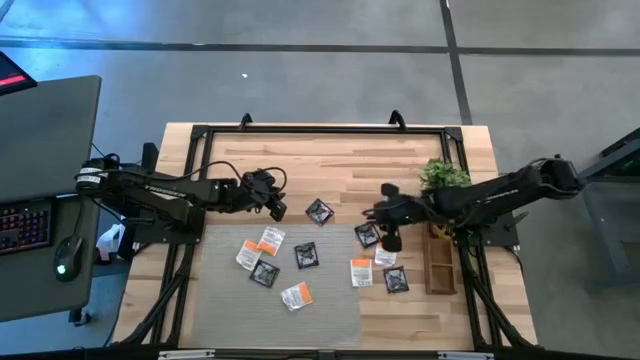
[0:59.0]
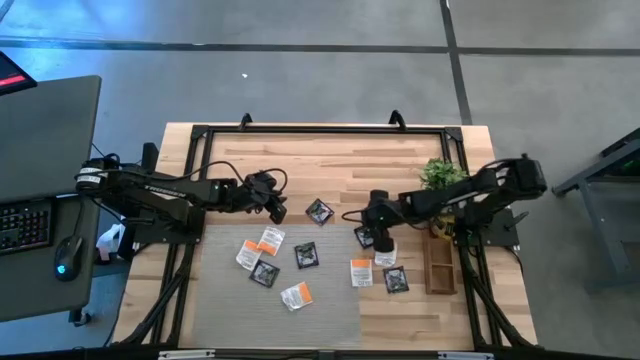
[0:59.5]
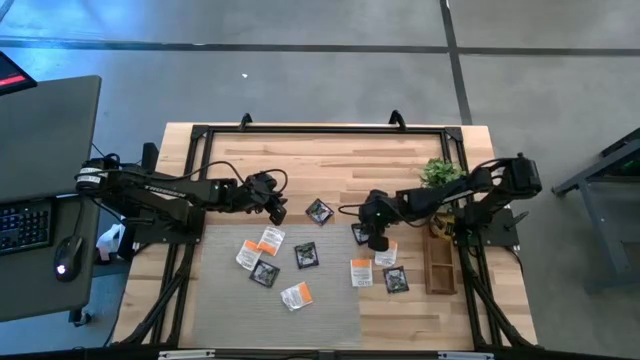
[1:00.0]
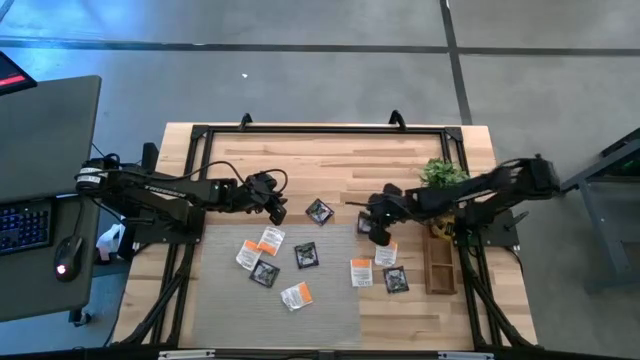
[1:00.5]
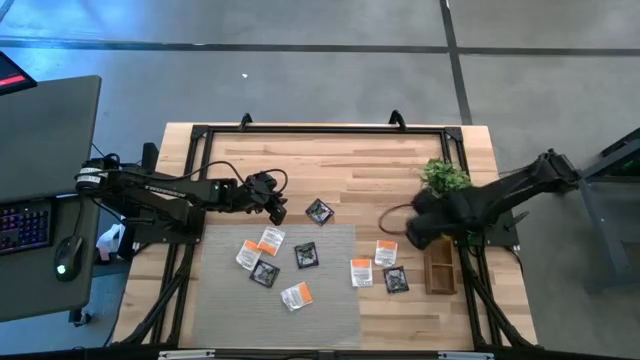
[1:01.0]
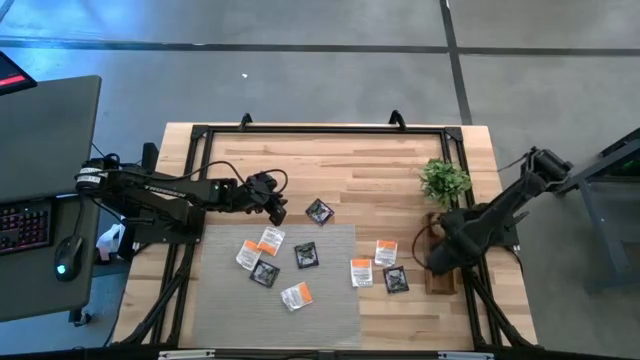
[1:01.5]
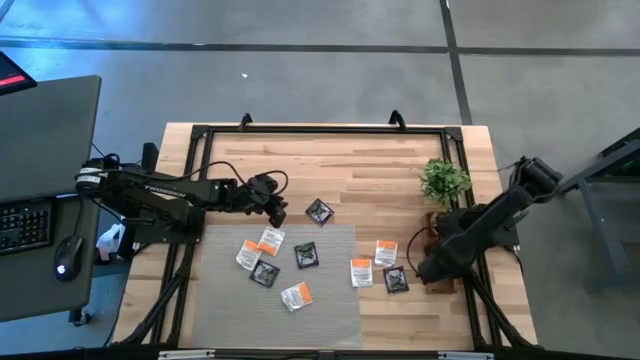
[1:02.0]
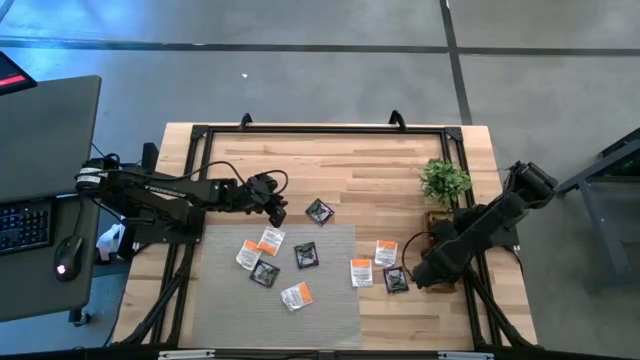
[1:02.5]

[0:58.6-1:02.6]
Task: Pick & Place Tea
Put the black tea bag into the middle section of the wooden organizer

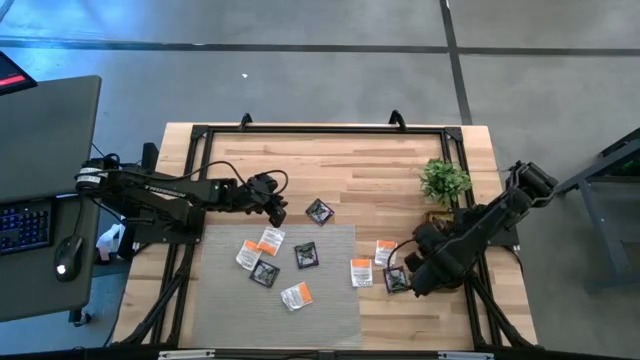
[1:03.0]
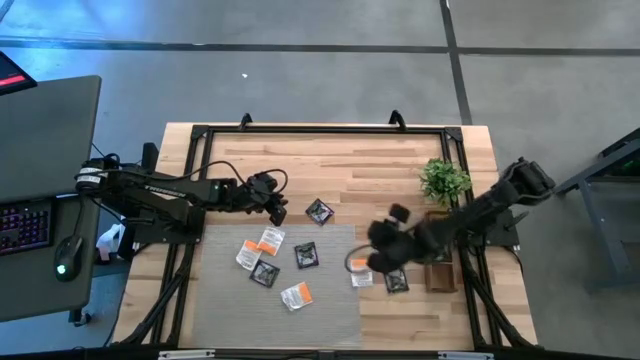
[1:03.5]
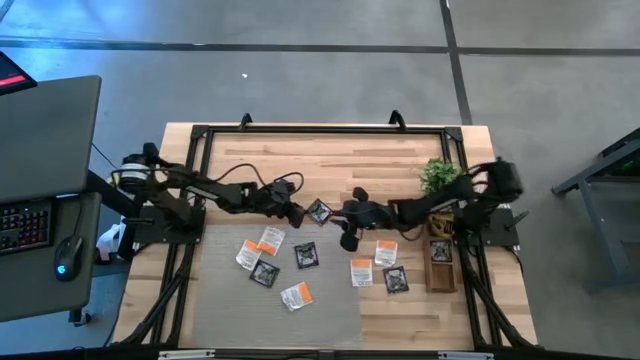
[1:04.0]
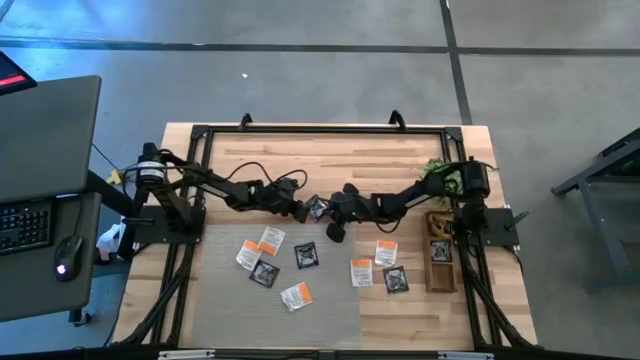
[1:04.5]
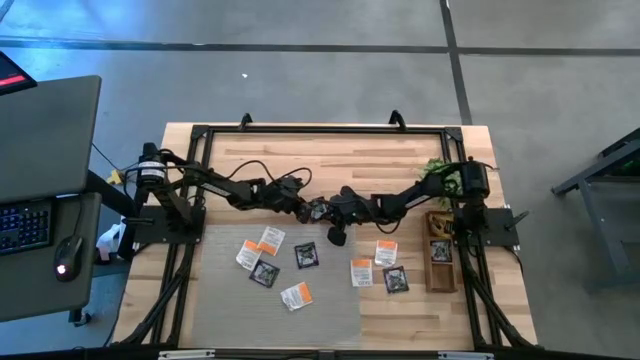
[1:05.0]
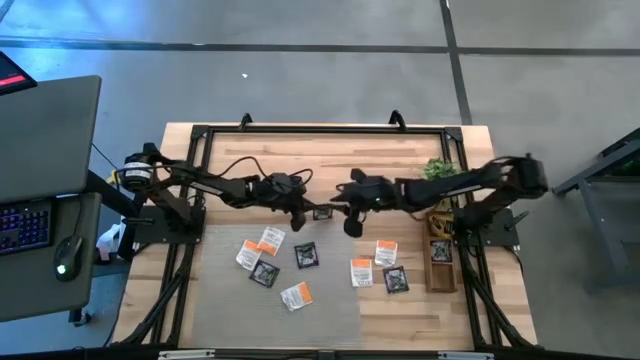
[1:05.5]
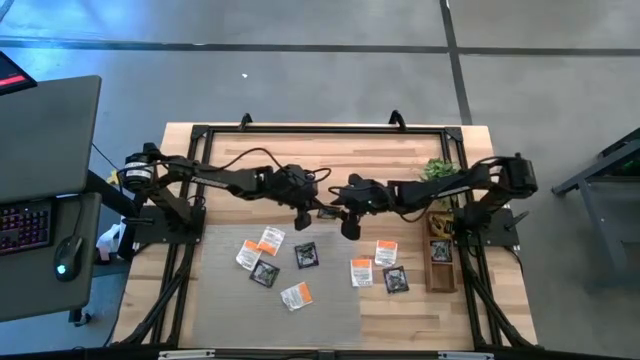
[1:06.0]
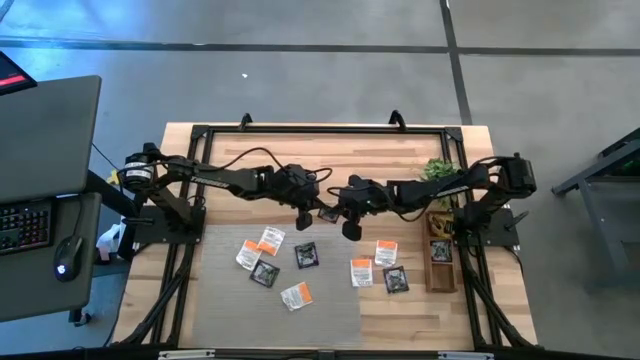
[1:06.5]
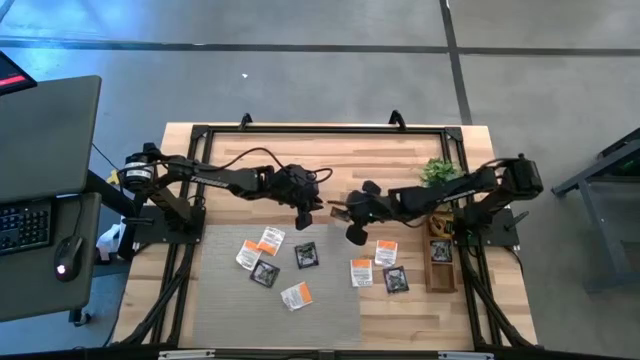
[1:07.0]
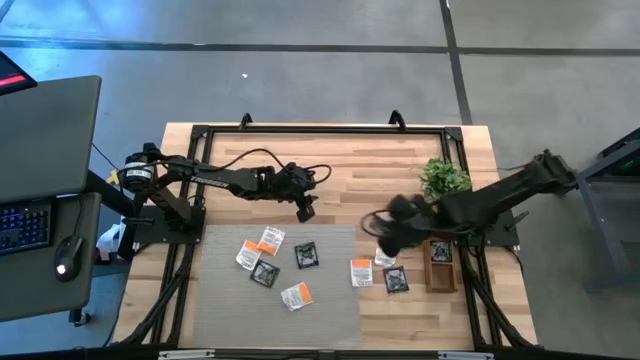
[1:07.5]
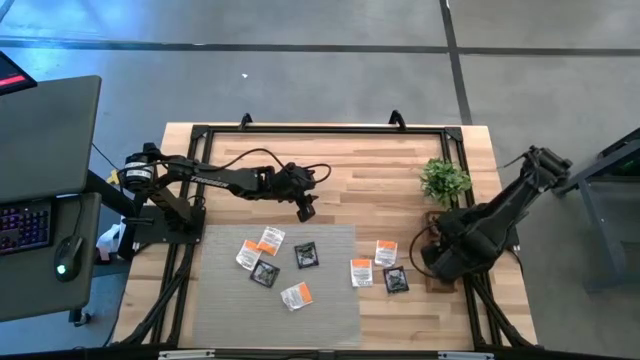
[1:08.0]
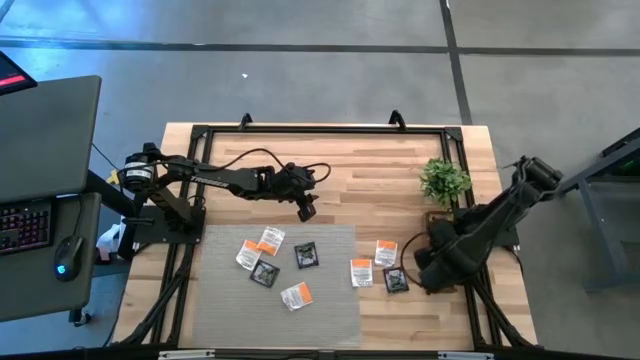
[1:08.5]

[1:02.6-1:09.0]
Put the black tea bag into the middle section of the wooden organizer

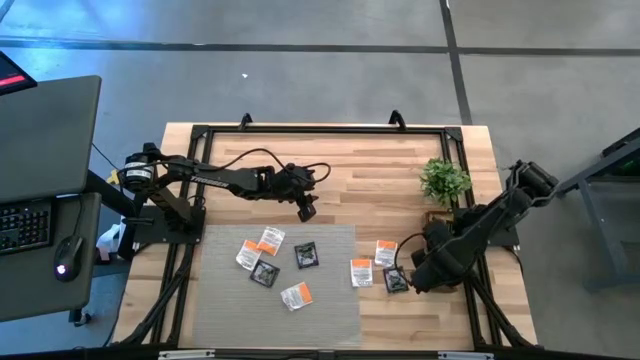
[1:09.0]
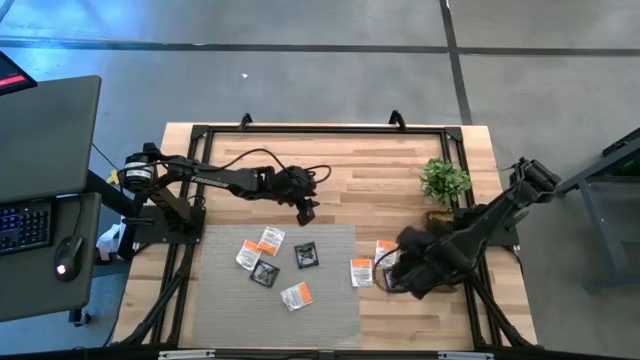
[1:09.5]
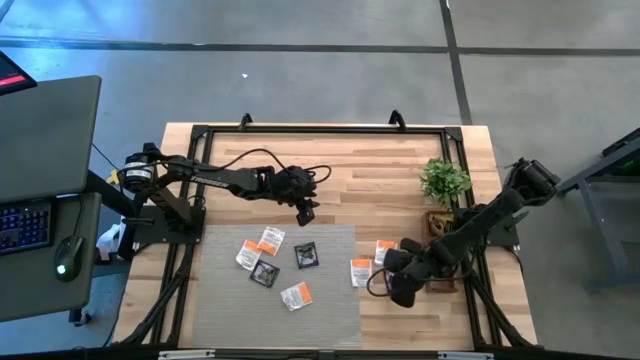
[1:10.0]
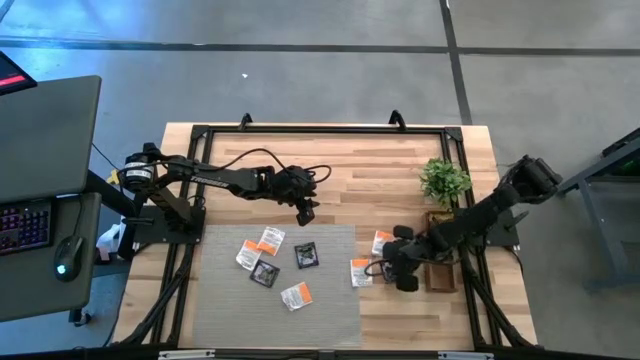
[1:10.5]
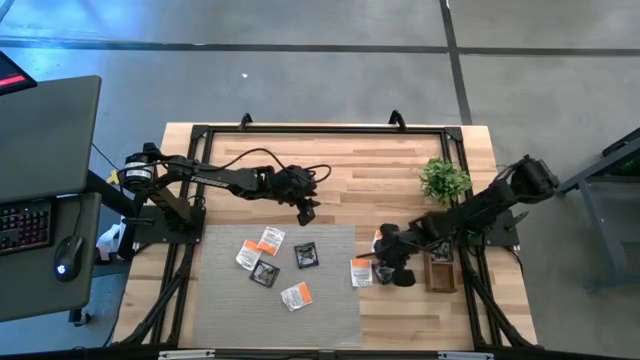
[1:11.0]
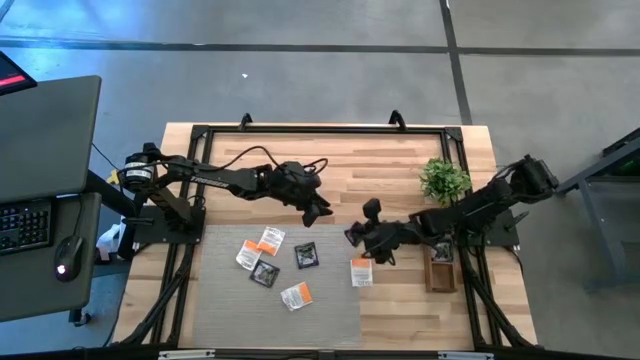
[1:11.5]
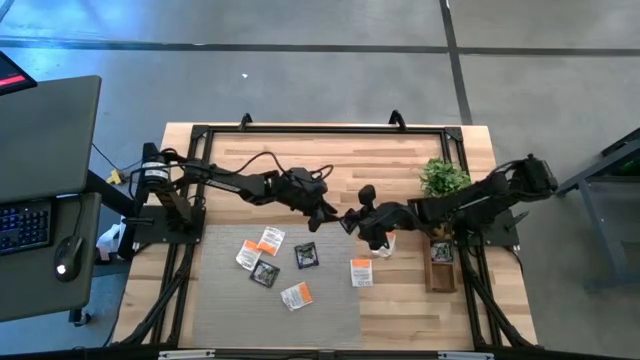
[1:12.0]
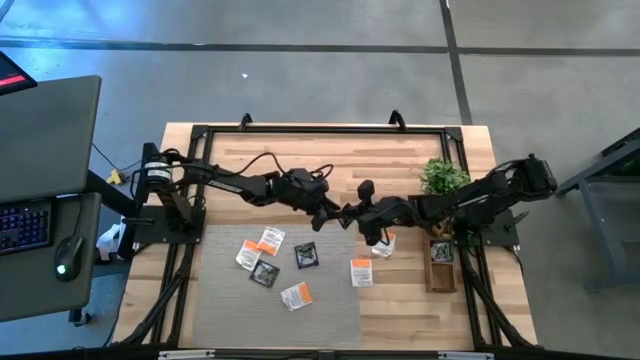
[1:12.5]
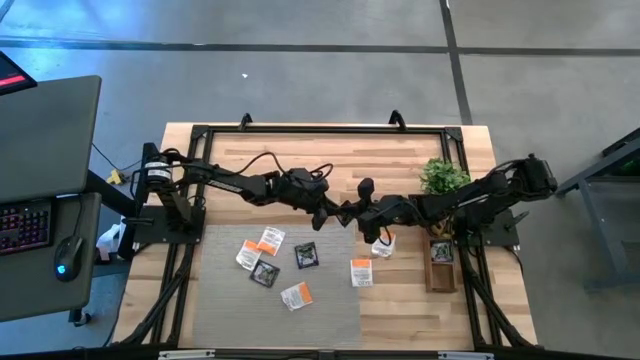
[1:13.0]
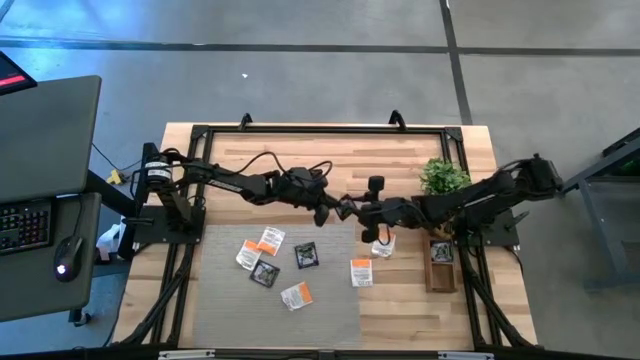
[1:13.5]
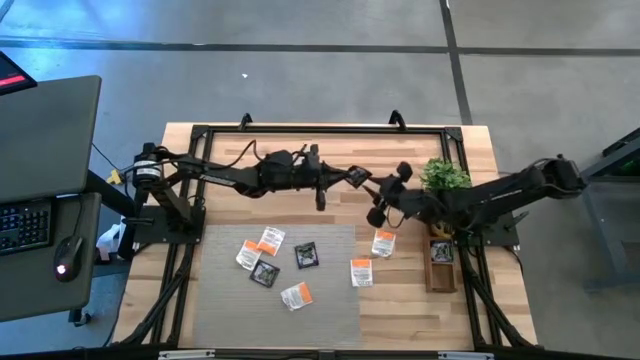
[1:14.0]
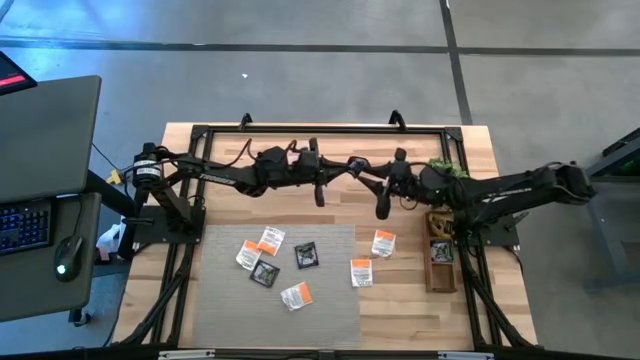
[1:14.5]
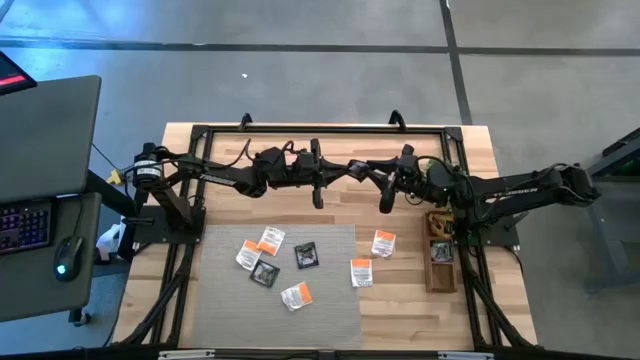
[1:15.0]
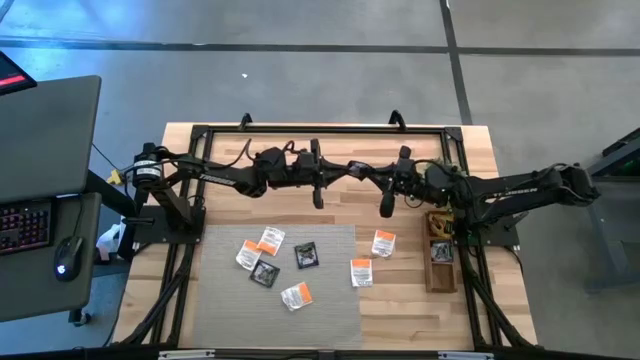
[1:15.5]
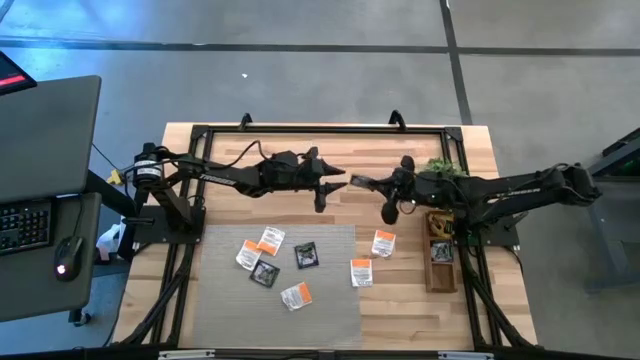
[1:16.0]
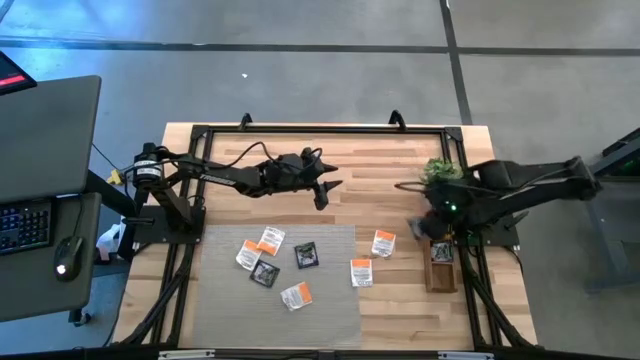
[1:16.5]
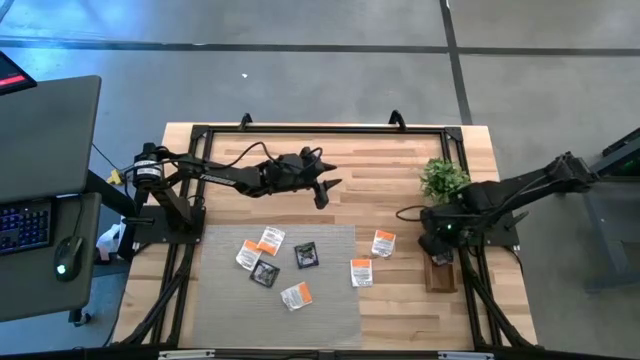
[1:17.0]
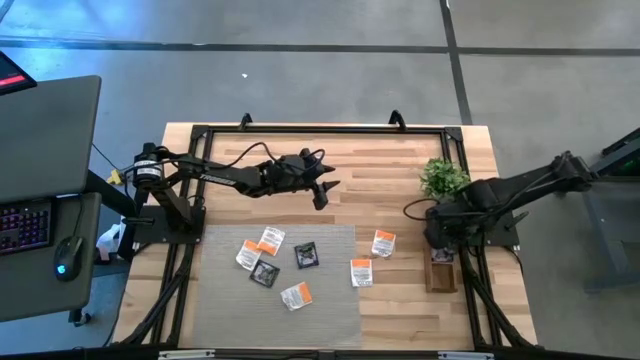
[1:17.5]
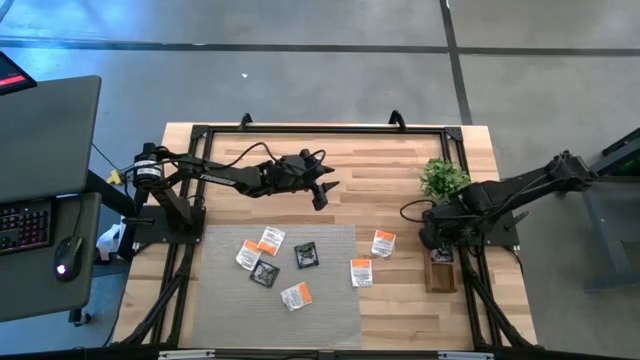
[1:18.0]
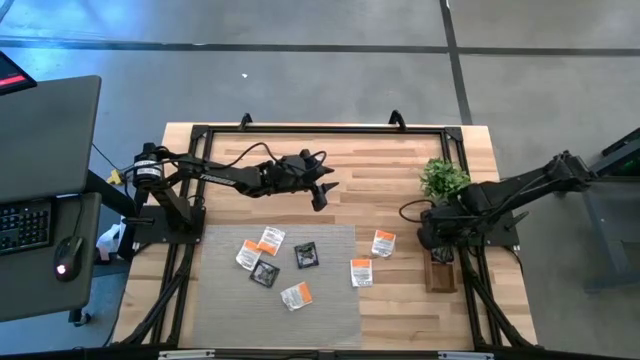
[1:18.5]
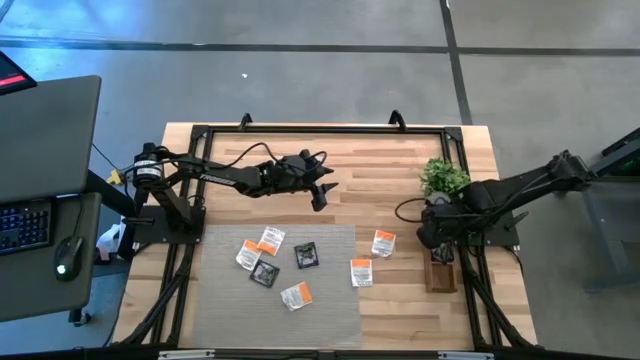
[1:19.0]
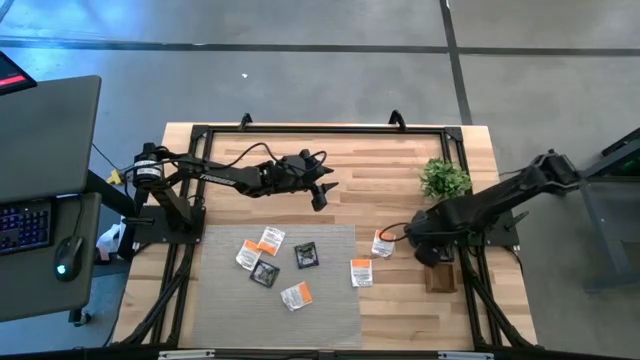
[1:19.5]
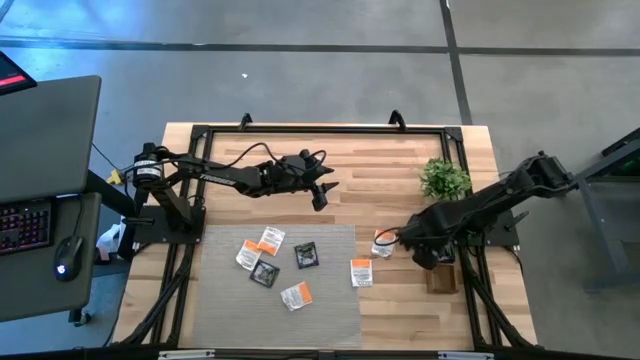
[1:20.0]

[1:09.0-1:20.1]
Put the black tea bag into the middle section of the wooden organizer
